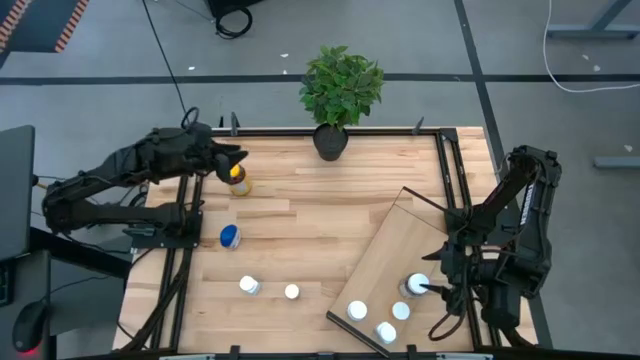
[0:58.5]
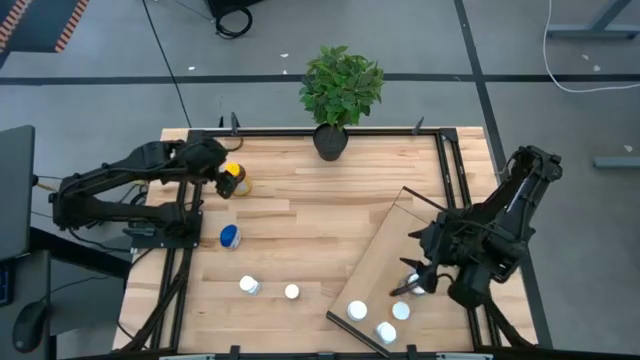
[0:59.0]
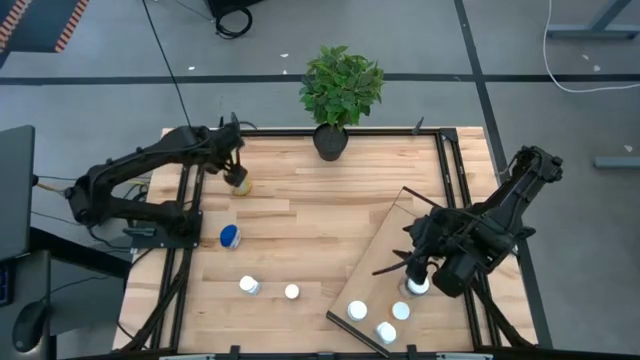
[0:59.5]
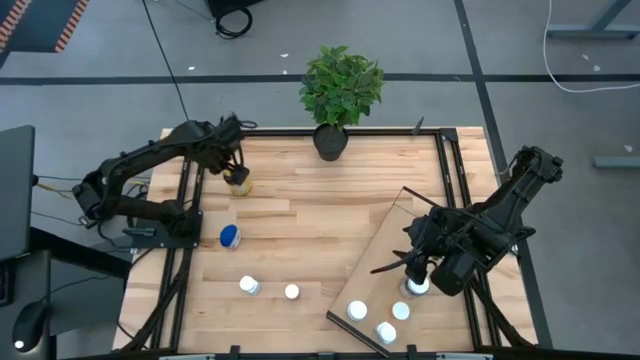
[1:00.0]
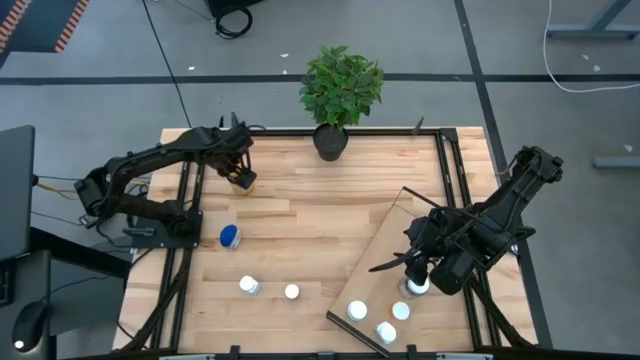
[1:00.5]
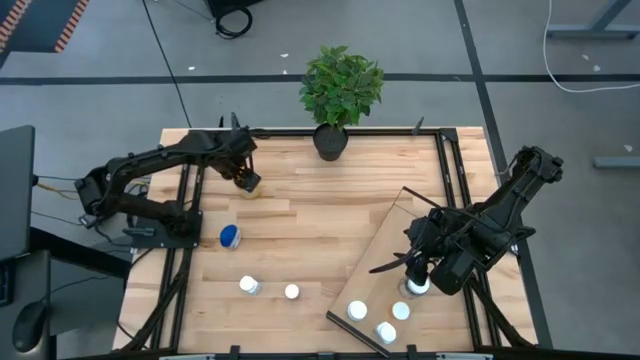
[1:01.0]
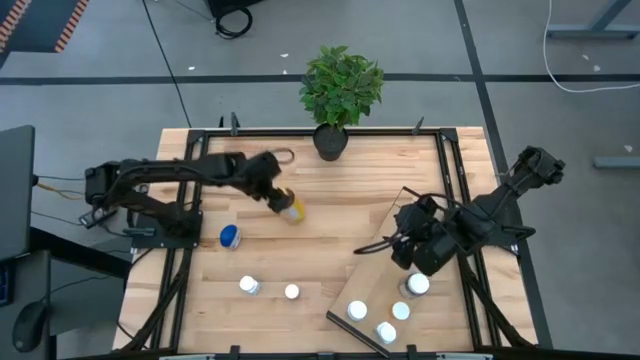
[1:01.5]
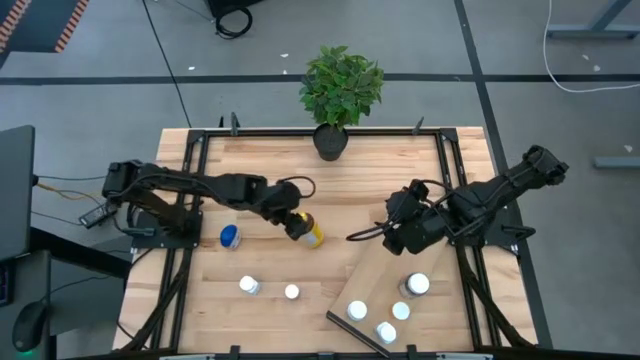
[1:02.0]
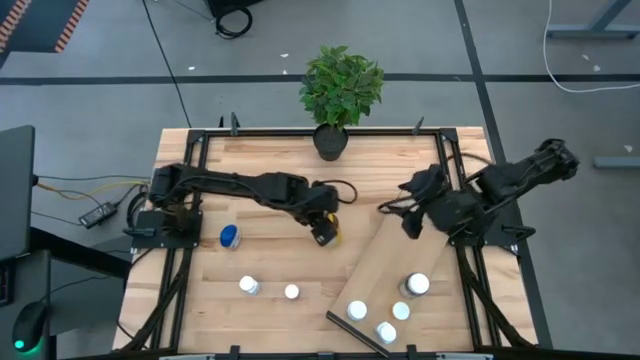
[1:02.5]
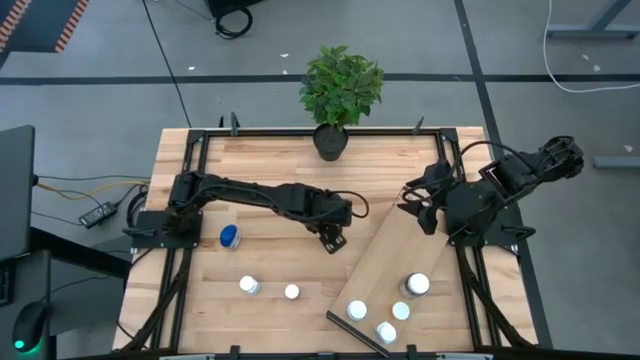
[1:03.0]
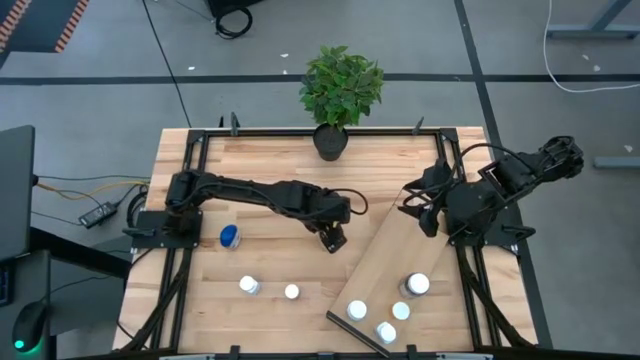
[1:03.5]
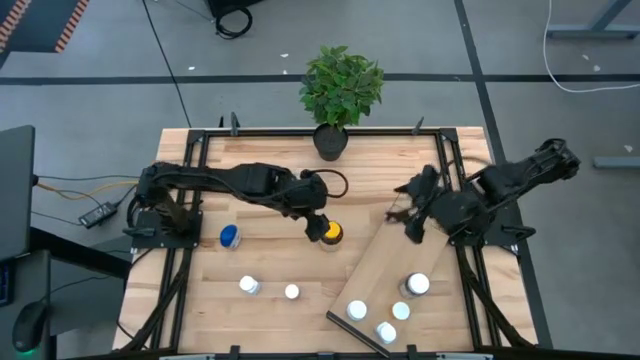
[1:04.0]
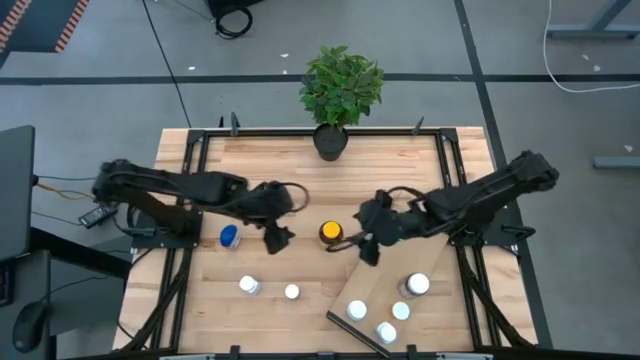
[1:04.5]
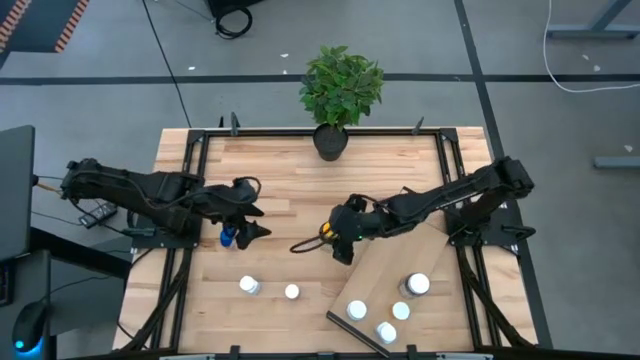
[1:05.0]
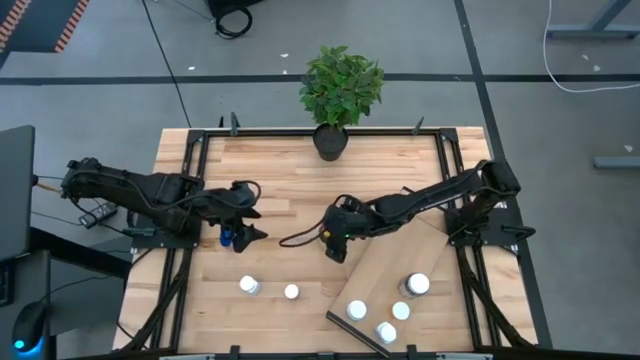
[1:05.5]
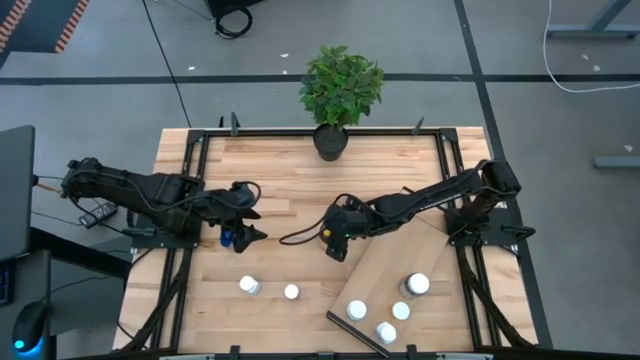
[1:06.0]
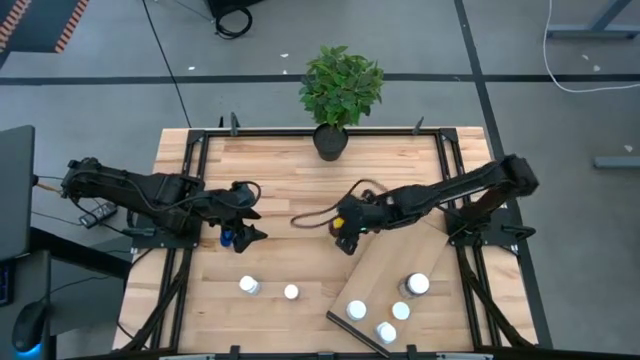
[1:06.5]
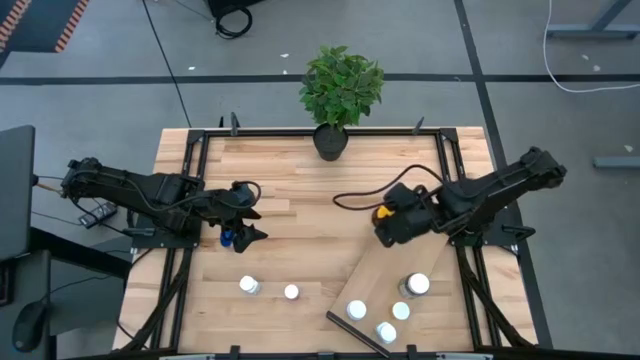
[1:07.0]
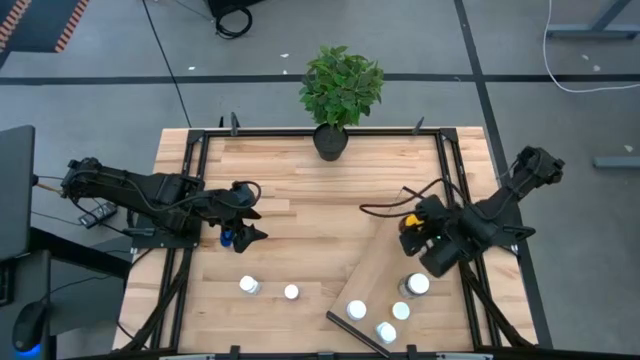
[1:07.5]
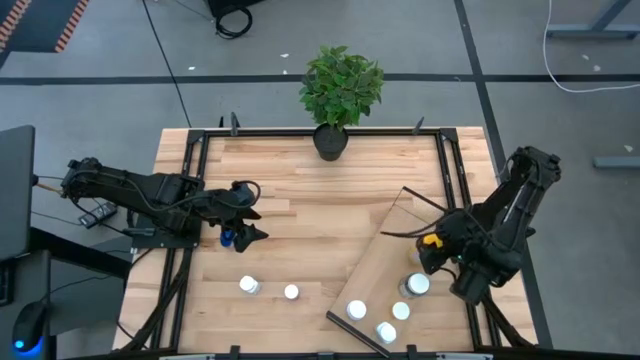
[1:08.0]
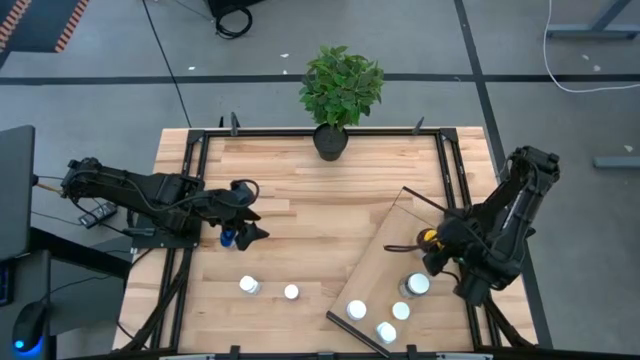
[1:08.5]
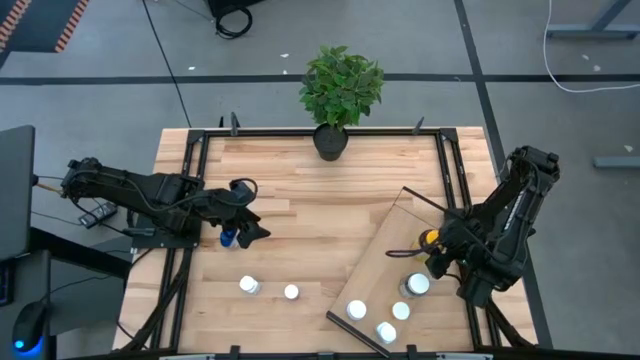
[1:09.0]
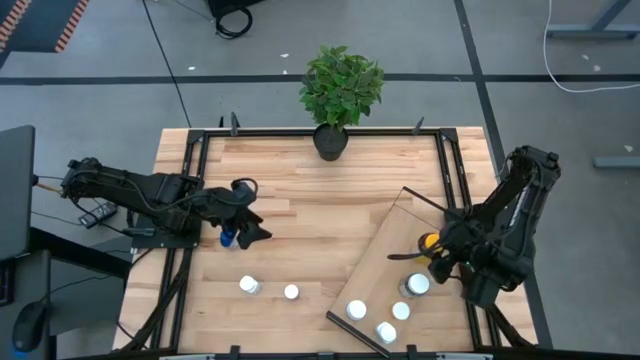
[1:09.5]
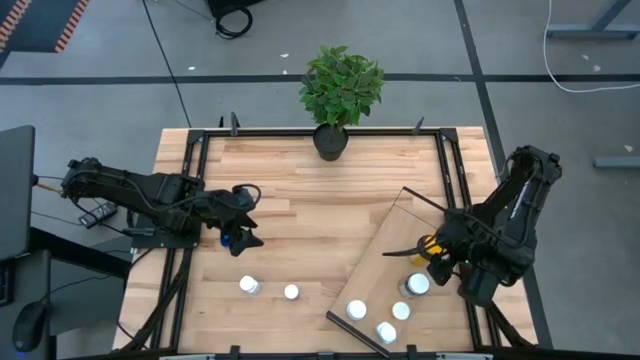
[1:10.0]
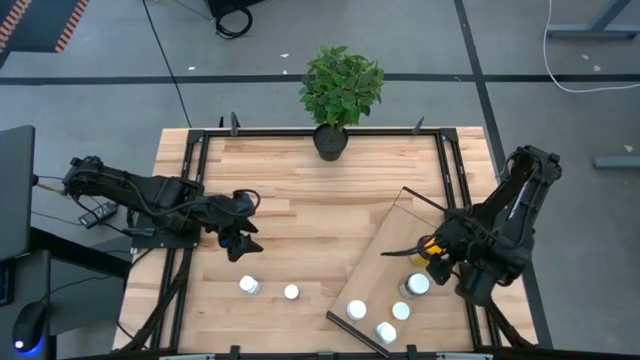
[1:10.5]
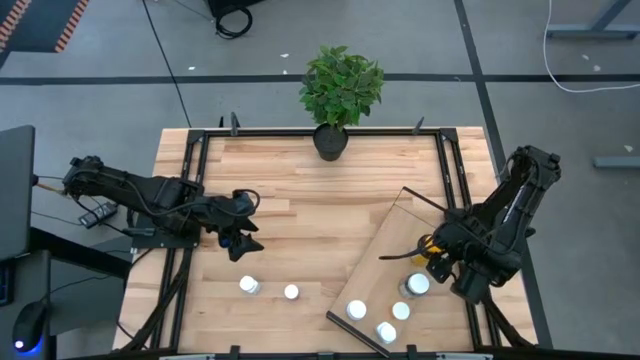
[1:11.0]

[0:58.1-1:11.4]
Task: Pick and place medicine bottles onto shelf by color
Put the yellow medicine bottle on the shelf

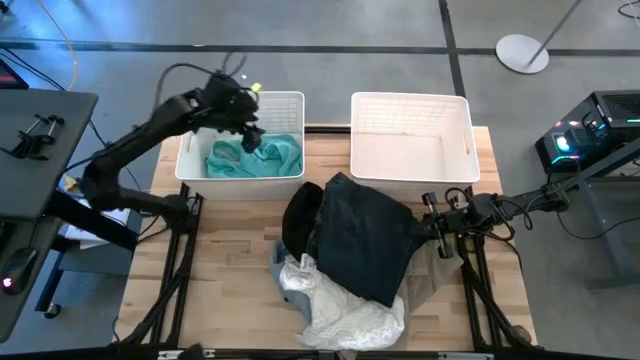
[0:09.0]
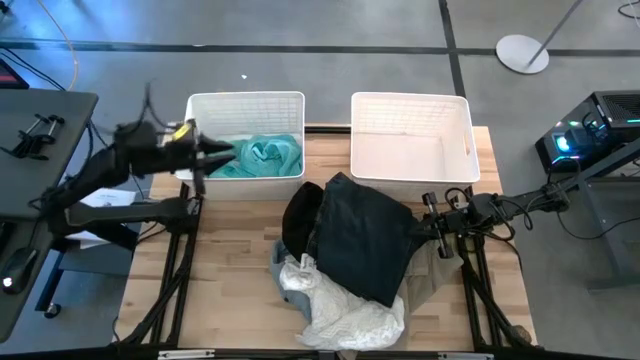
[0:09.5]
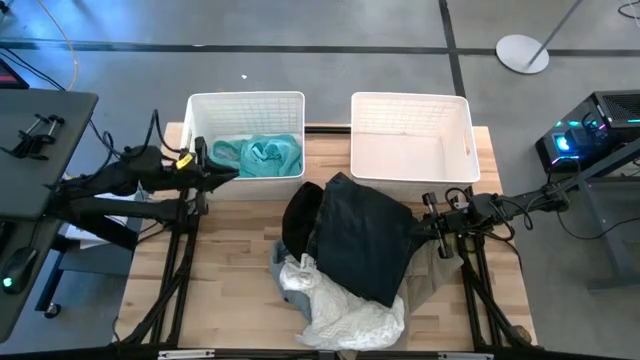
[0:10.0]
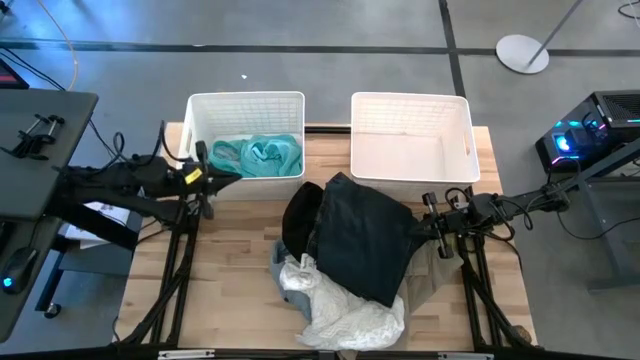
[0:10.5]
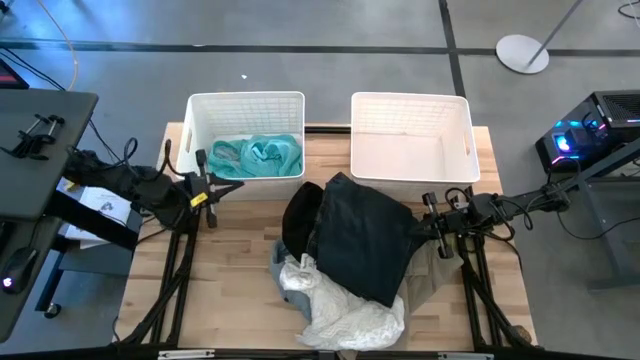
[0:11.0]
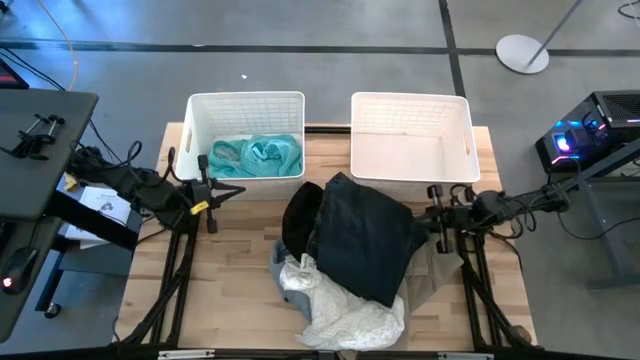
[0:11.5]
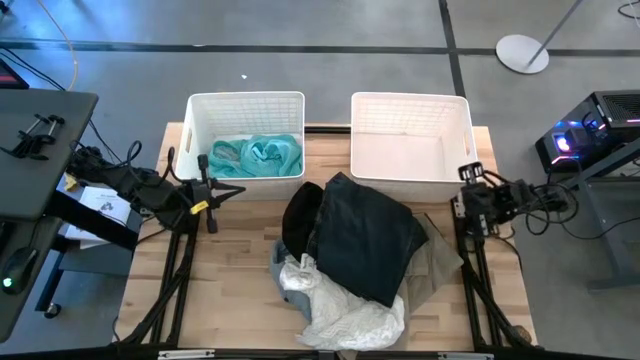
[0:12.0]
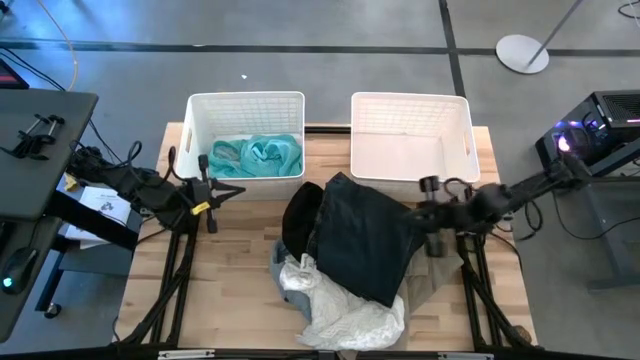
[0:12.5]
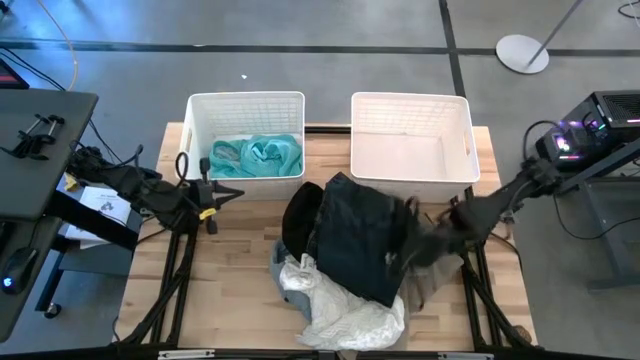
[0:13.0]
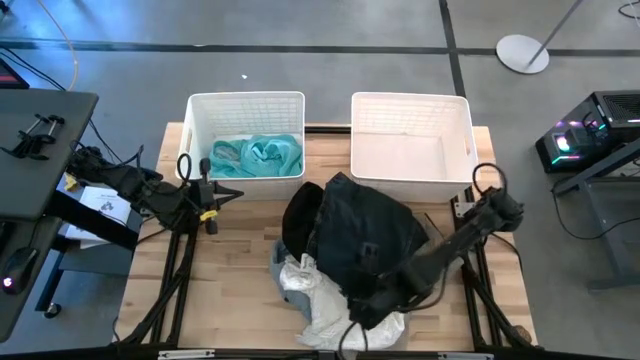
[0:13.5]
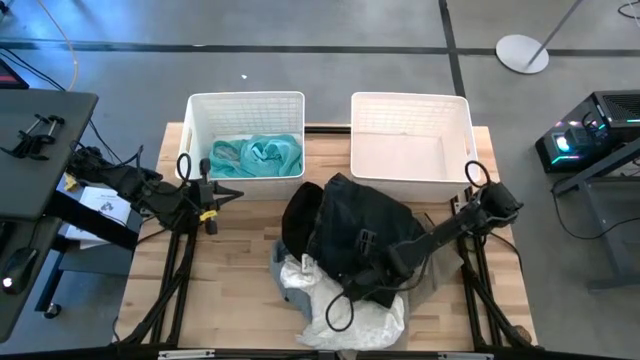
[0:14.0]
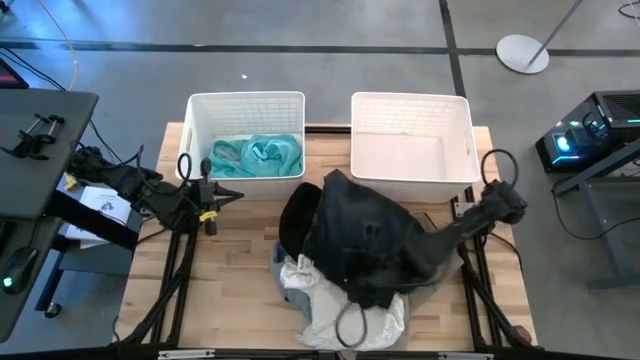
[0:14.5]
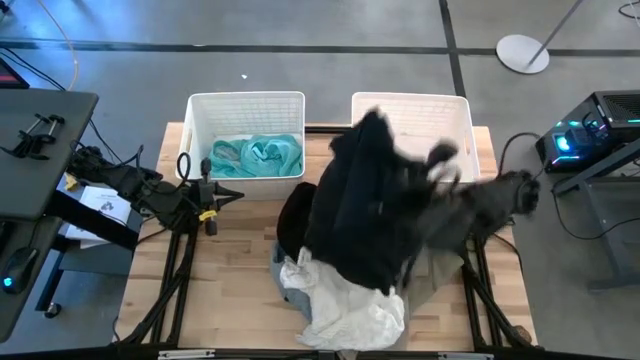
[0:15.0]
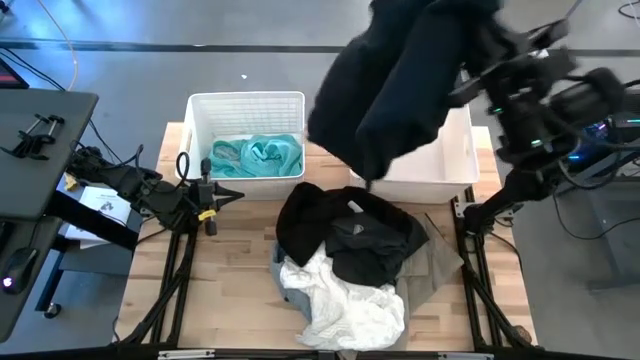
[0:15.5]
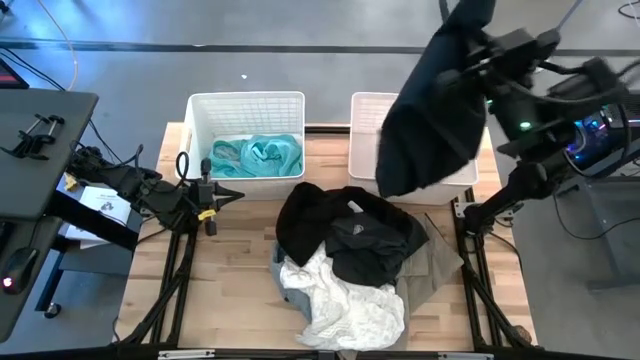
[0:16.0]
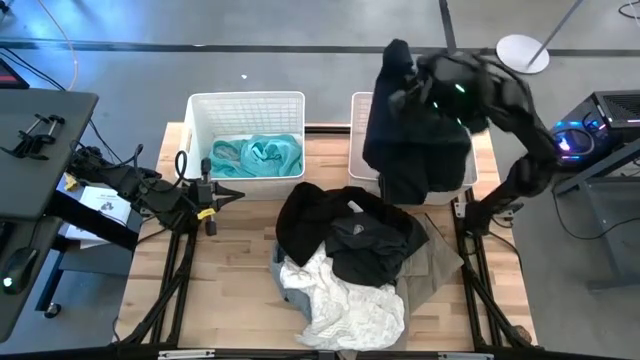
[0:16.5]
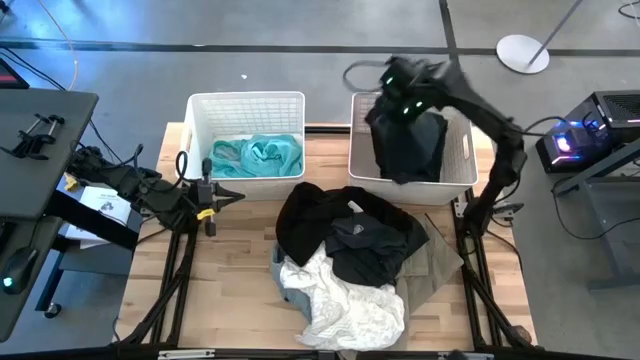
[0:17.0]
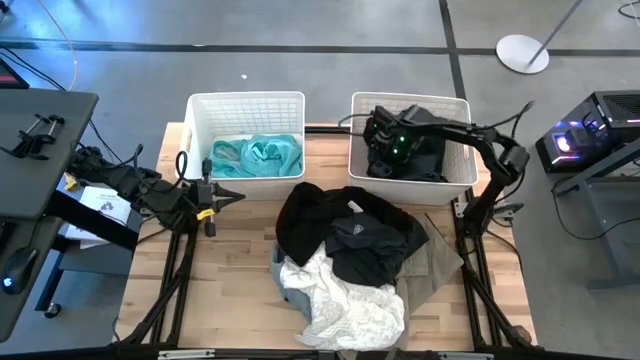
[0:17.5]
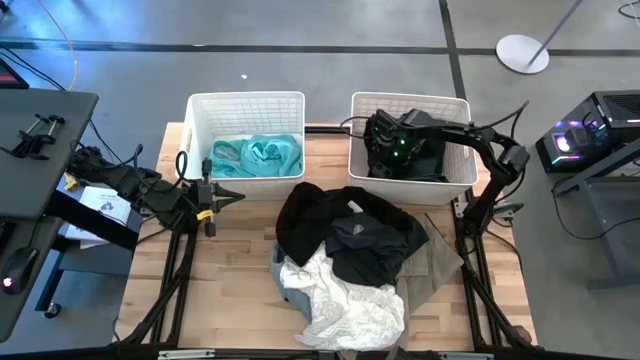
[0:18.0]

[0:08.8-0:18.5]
Task: Sort clothes
Put the dark blue pants into the right white laundry bin
